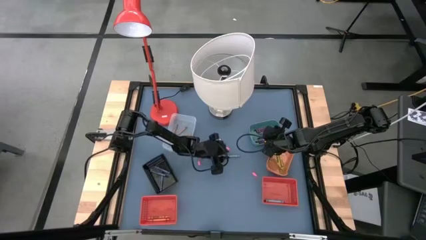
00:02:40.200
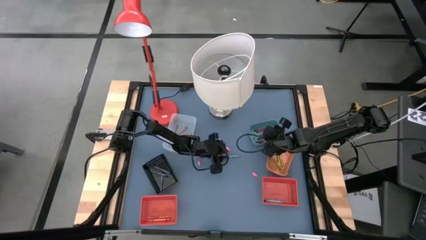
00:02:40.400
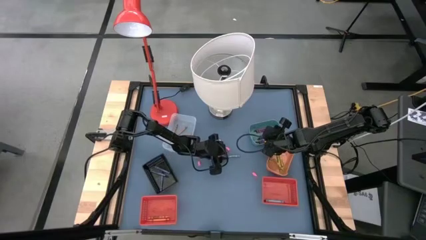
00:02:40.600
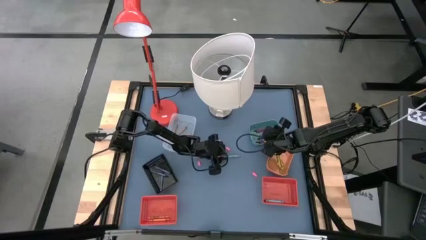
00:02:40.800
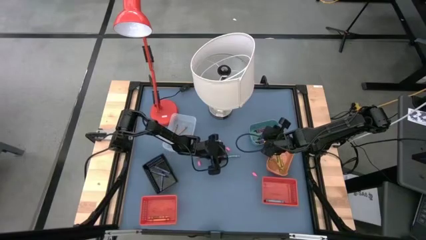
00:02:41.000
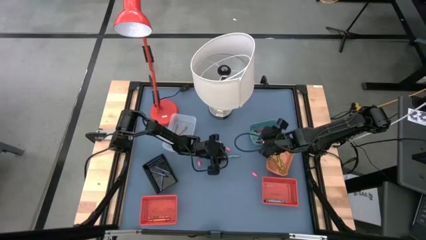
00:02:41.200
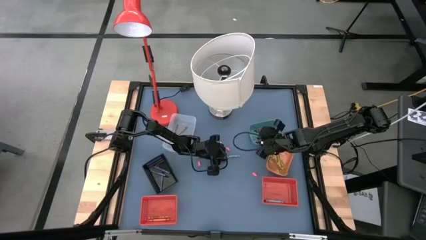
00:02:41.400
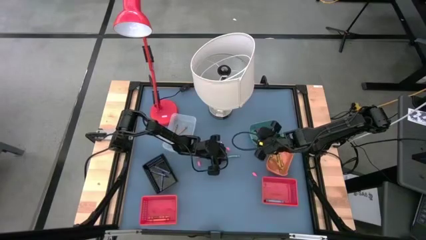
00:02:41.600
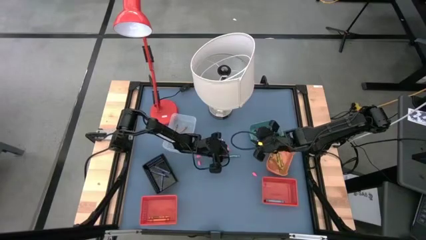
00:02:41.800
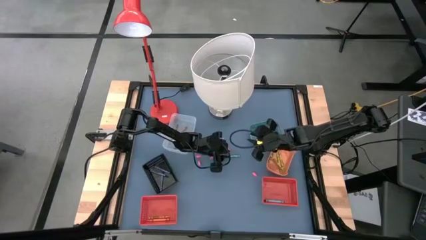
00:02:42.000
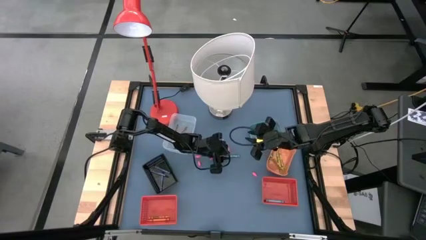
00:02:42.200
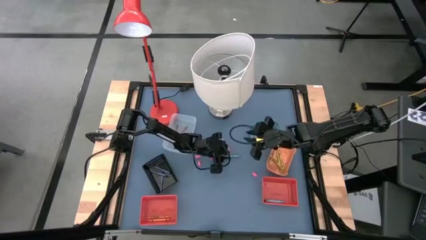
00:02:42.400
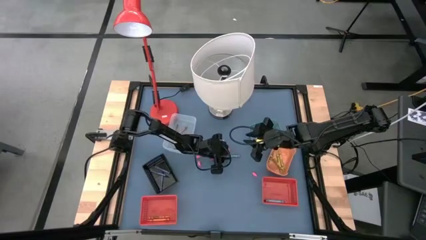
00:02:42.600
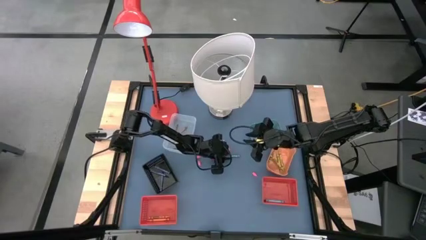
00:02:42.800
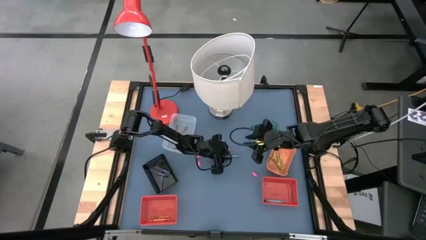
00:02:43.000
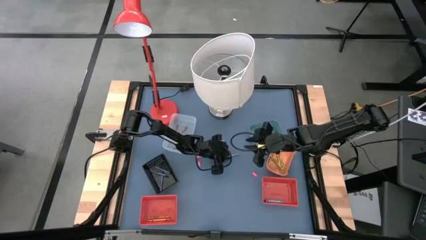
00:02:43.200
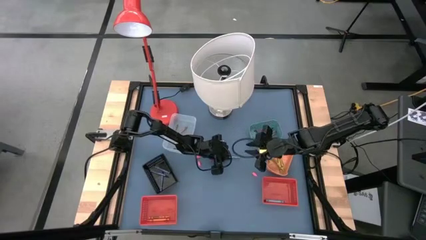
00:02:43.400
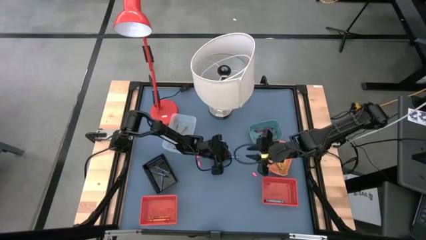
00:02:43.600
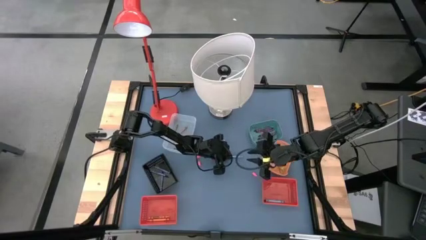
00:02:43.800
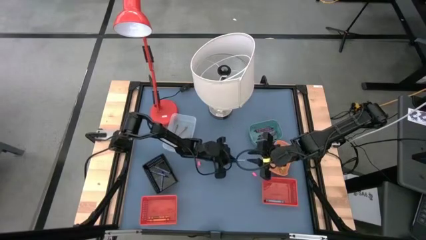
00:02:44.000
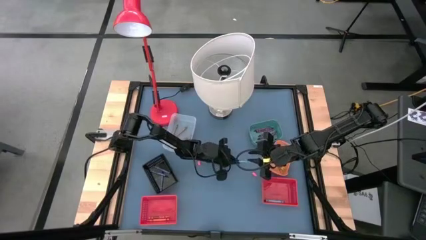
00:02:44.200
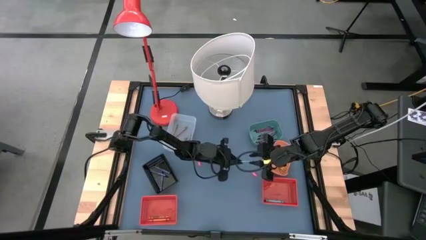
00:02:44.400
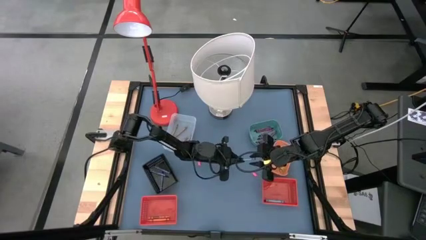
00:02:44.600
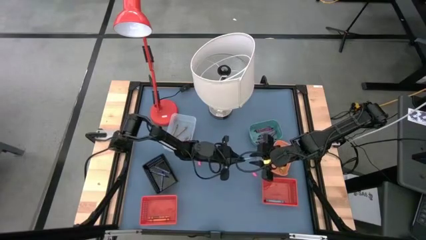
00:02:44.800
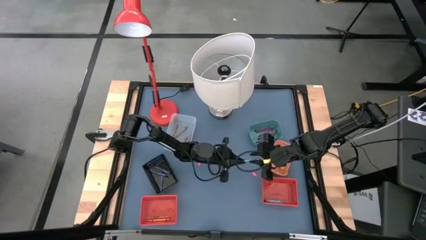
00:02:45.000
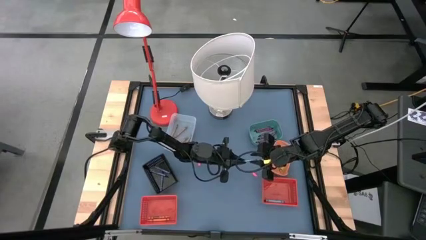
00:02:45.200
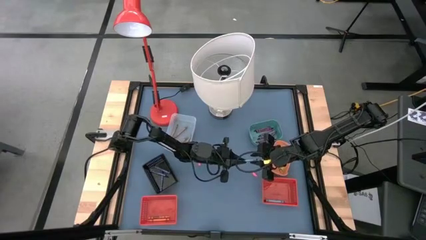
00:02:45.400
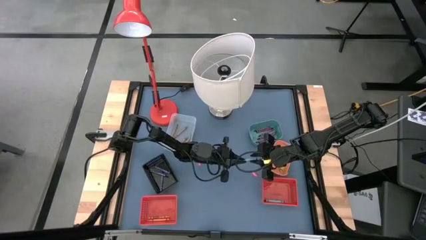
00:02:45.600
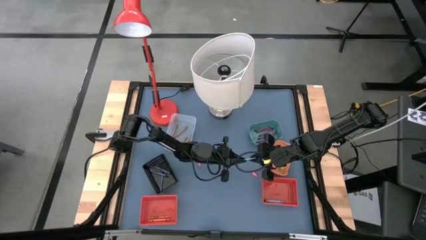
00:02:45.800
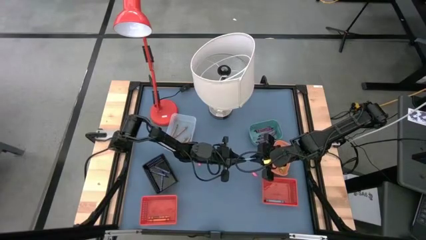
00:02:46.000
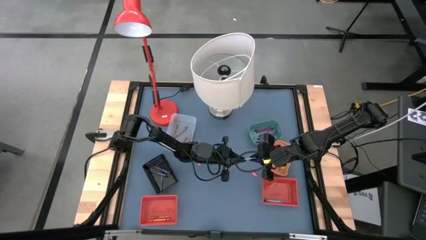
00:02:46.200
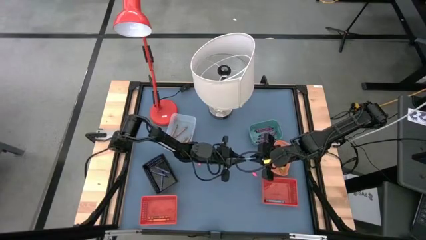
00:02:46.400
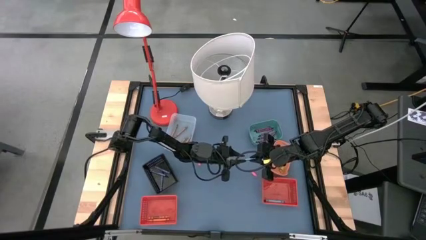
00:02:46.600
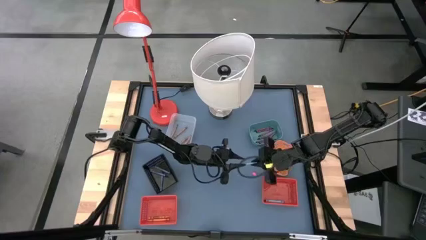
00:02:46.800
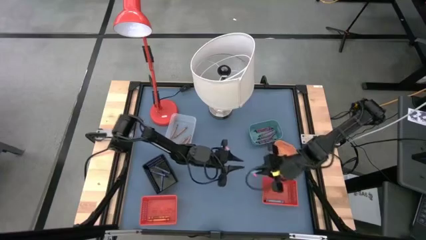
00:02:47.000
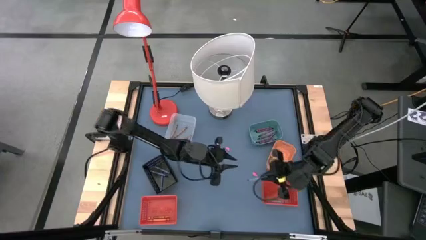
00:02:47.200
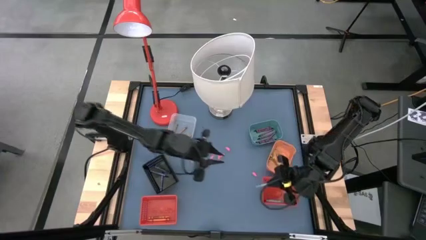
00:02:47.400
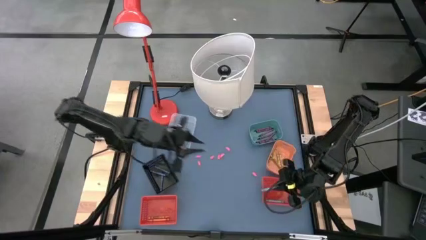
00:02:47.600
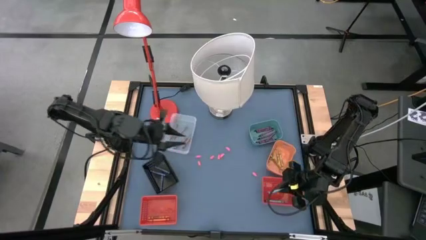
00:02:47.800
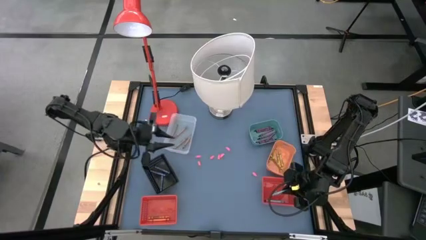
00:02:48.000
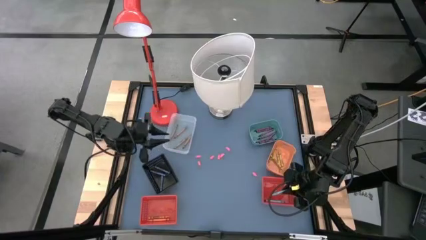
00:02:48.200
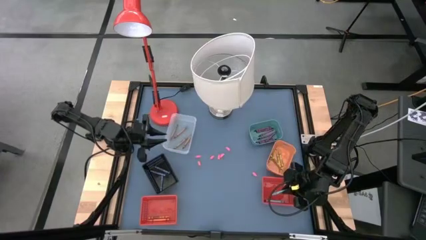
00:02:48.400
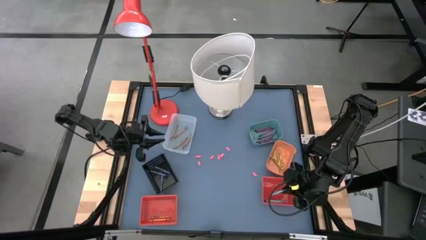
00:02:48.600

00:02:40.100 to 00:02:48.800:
Task: Sort crayons
Put the blue crayon into the right red bin

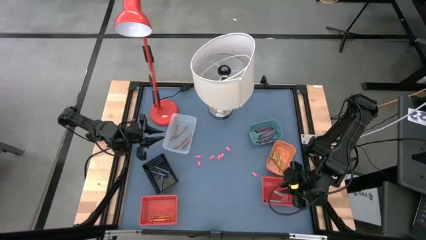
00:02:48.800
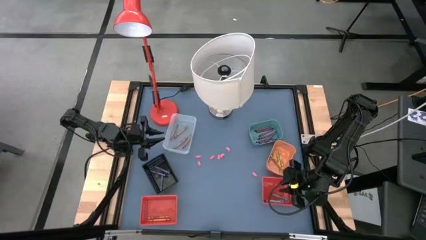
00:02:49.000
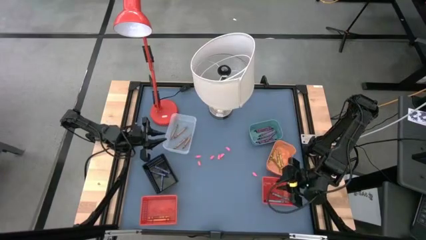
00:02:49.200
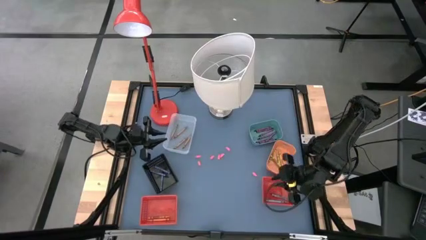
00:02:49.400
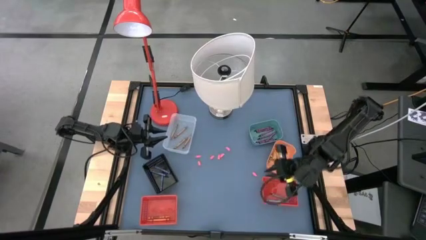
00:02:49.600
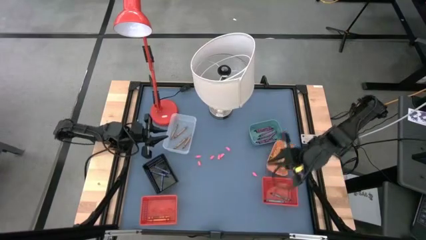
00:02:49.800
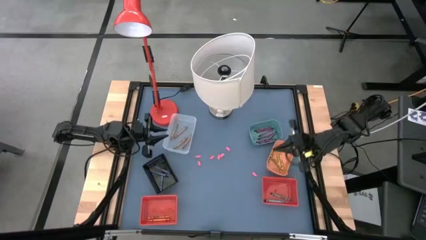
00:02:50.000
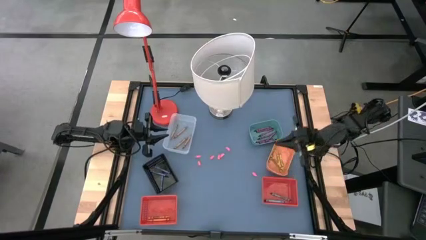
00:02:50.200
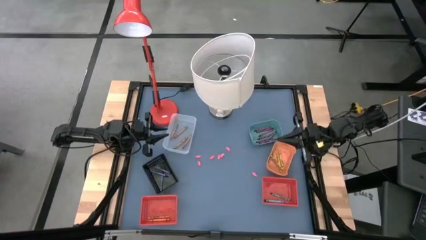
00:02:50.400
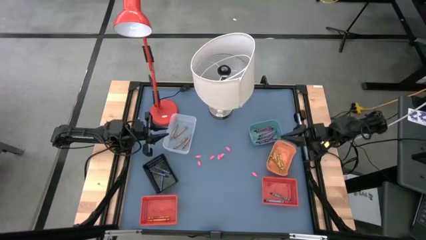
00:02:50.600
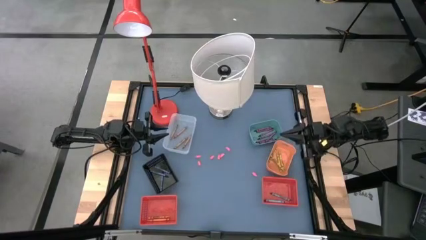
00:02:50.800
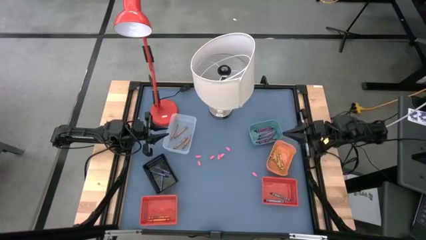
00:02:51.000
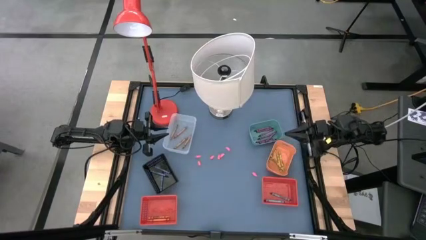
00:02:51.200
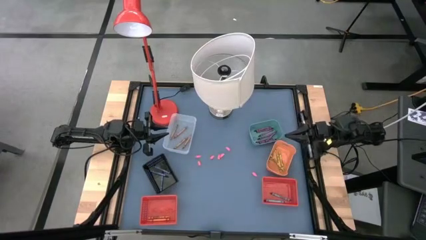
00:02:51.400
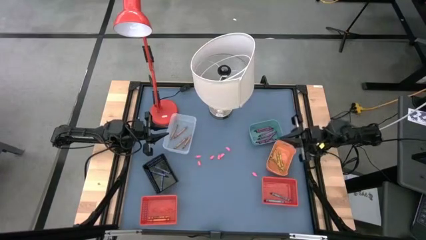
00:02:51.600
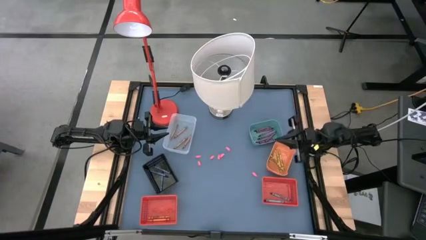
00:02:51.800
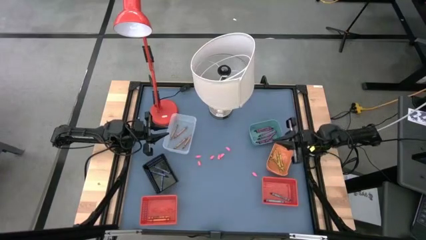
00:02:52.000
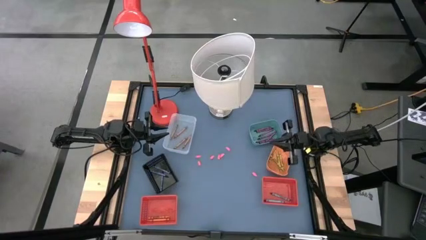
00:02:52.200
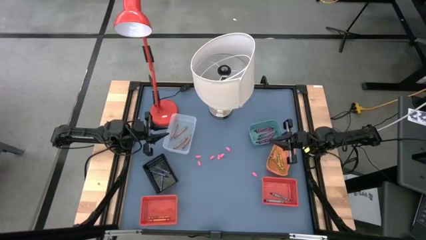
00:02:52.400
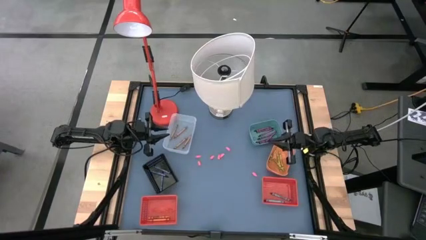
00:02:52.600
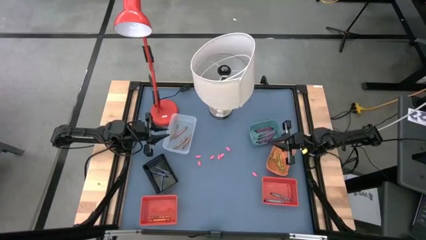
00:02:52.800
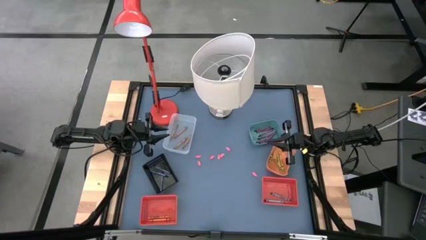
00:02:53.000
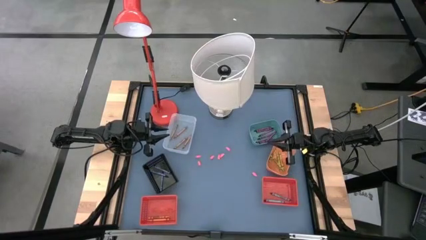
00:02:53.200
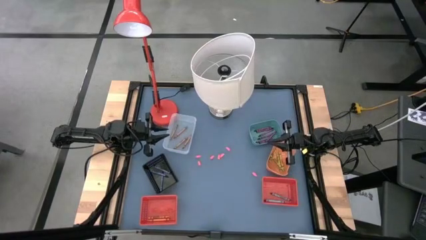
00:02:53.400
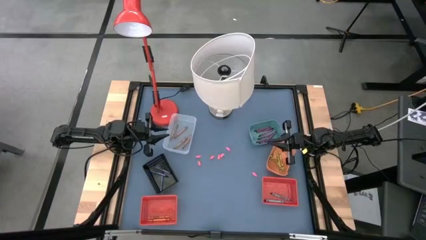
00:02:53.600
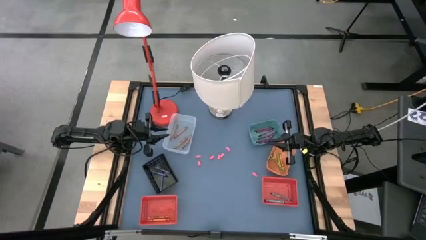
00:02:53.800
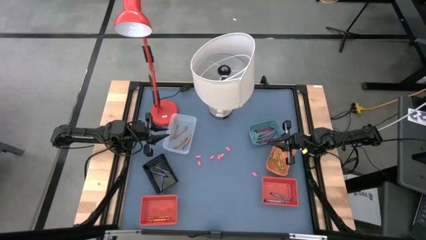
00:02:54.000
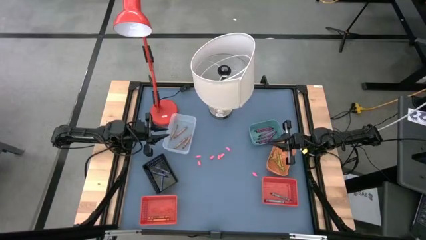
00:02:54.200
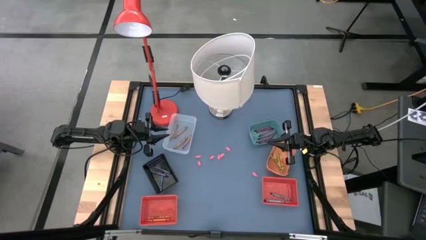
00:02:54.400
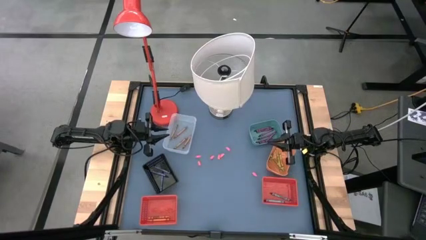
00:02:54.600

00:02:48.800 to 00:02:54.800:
Return to Home Position
